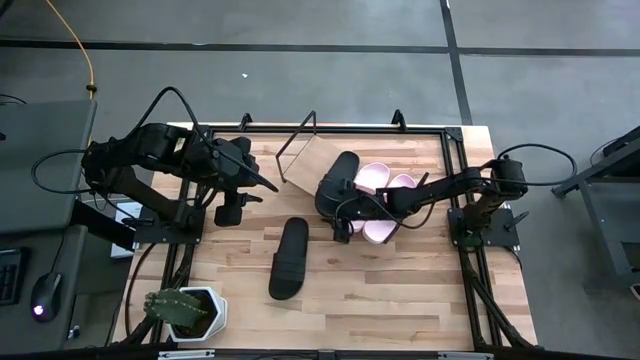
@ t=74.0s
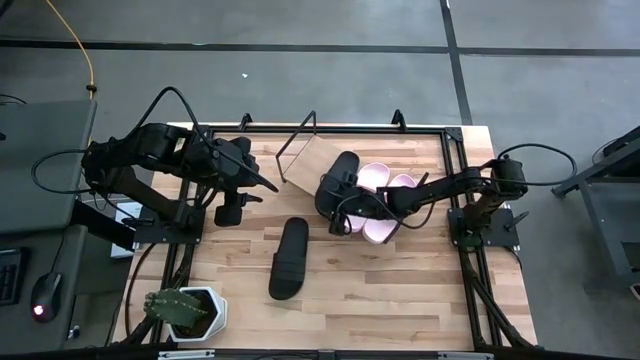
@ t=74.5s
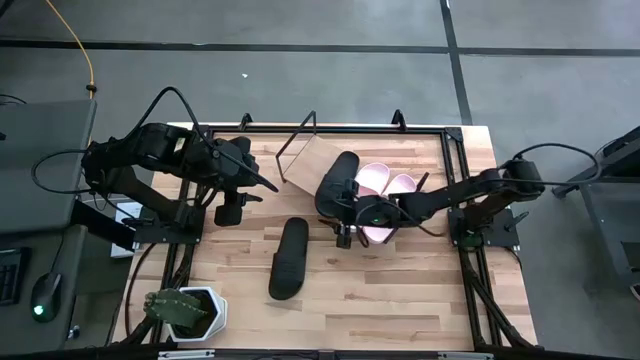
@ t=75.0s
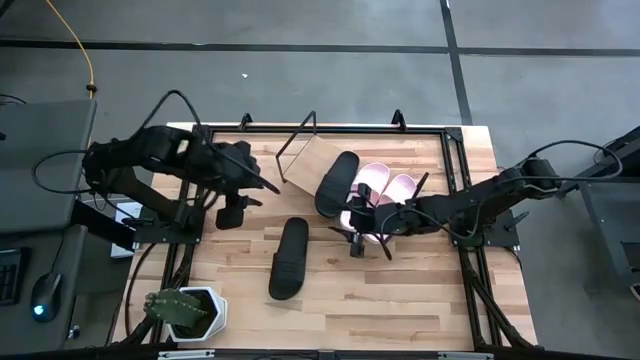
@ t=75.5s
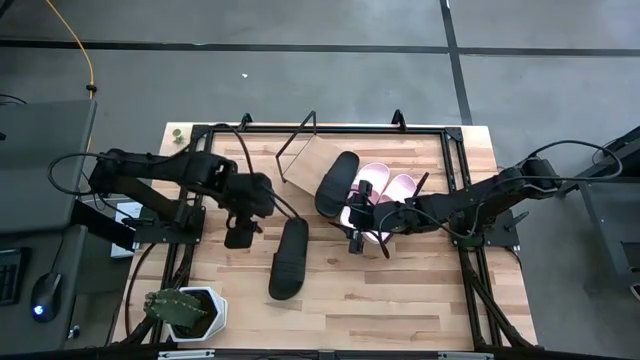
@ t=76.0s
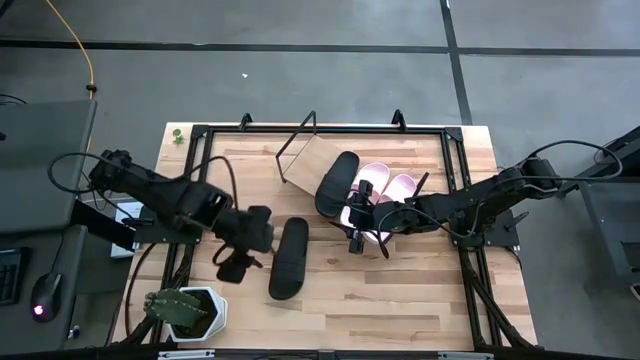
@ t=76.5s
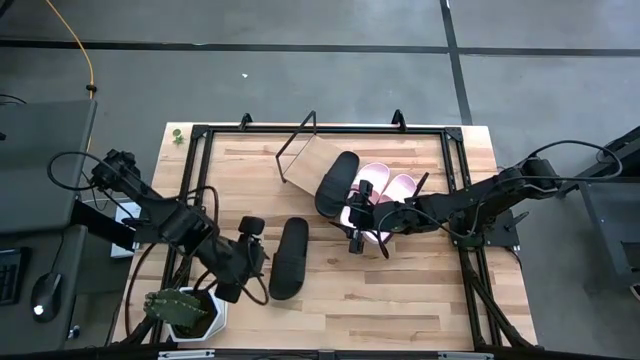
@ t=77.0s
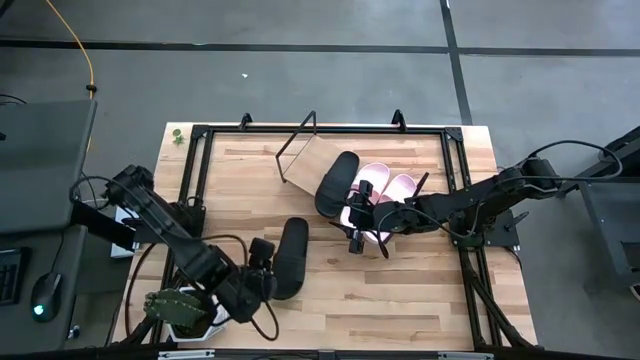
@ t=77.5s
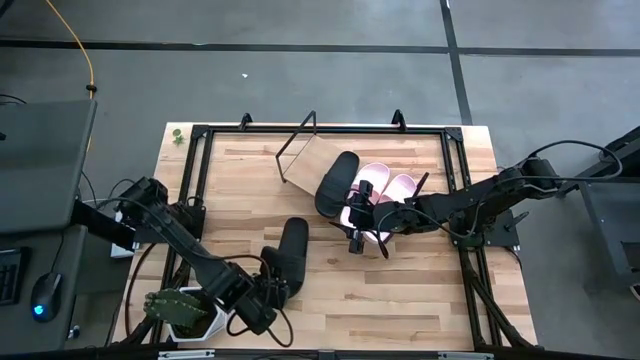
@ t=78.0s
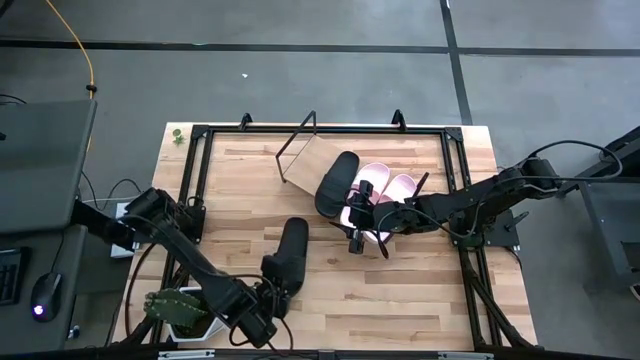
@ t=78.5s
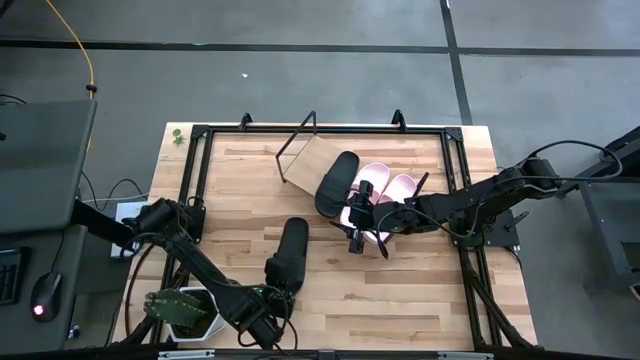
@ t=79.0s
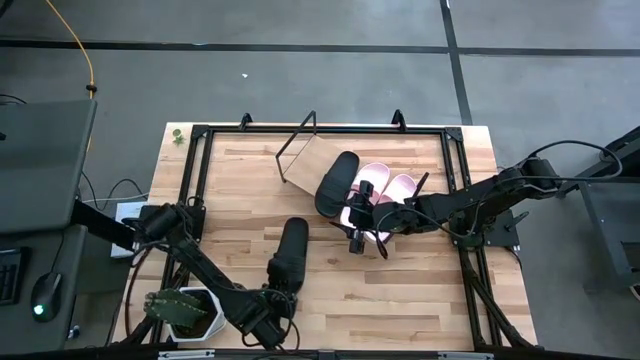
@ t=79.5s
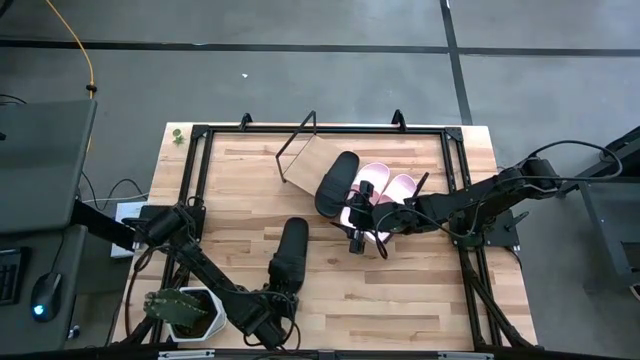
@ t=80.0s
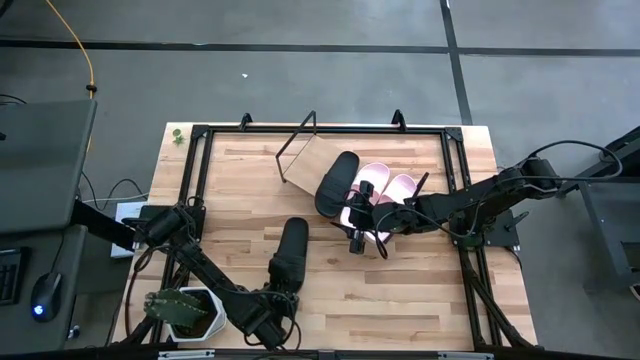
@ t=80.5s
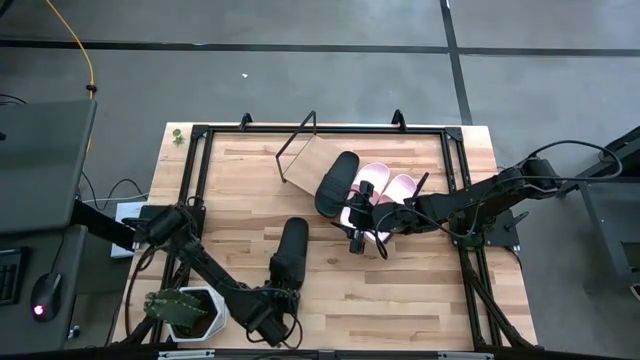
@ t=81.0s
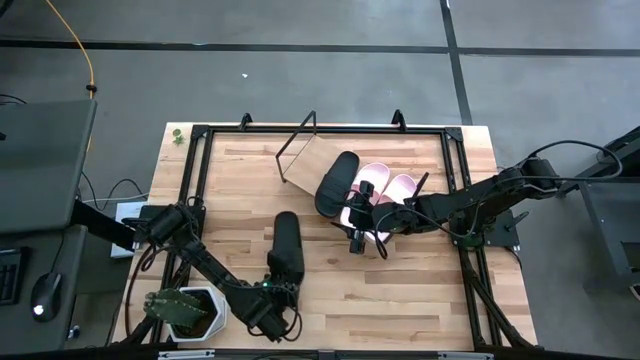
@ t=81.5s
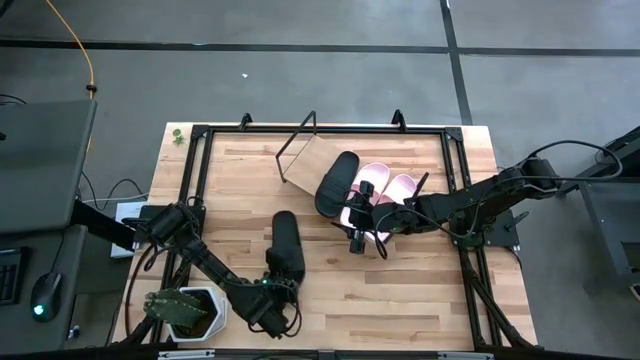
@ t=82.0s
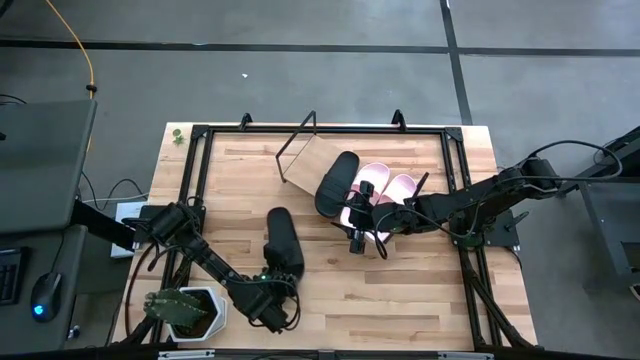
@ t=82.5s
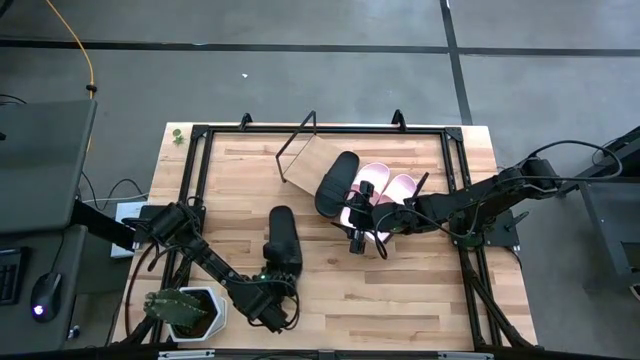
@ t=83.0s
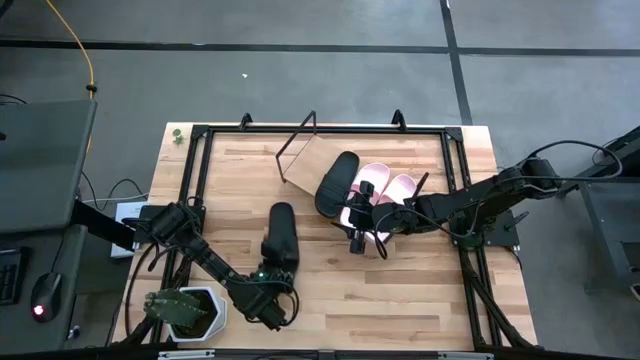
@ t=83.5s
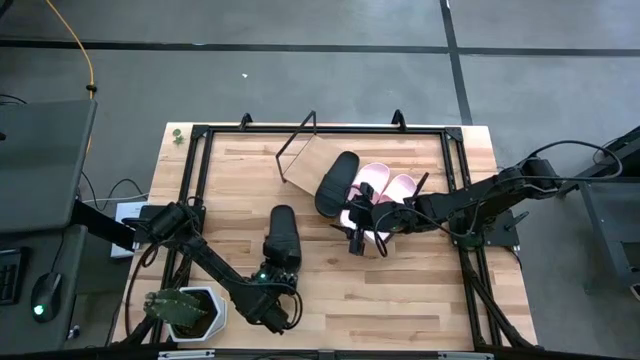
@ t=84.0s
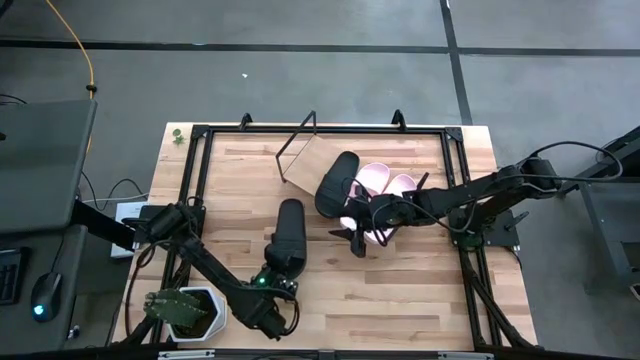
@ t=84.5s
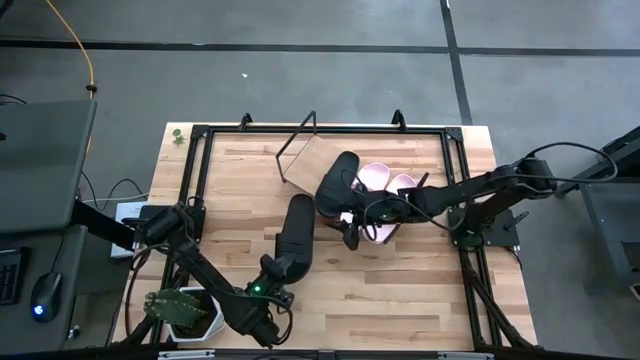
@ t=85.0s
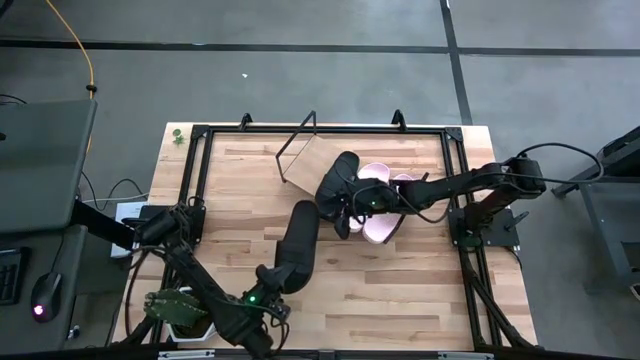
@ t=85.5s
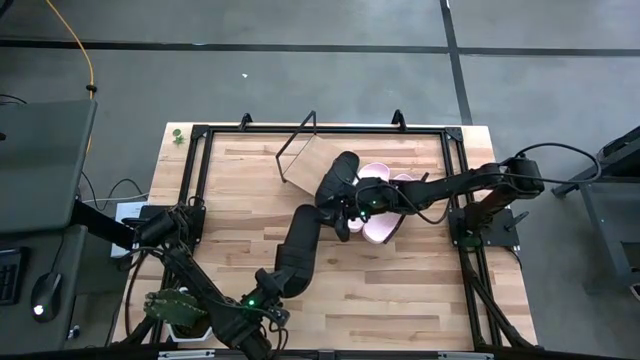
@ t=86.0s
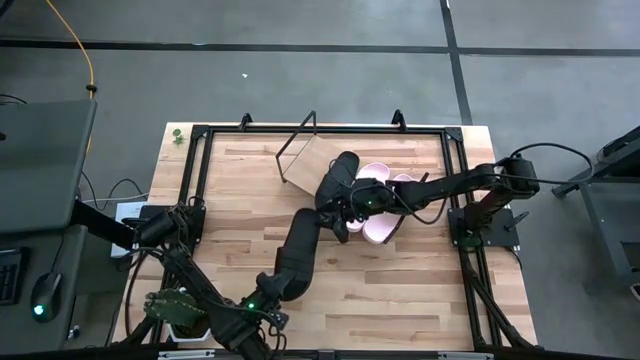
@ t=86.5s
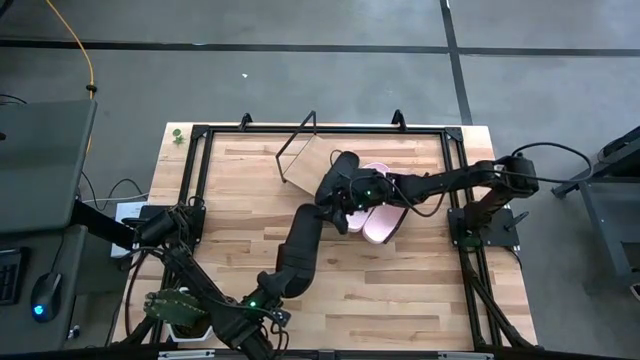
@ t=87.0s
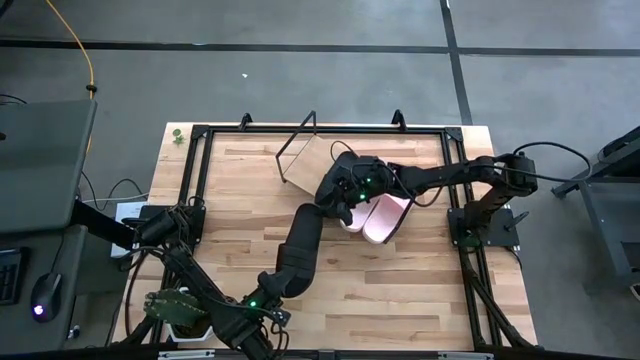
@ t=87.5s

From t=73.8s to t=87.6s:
Task: Pick and place slides into the shelf
Put the black slide to the shelf

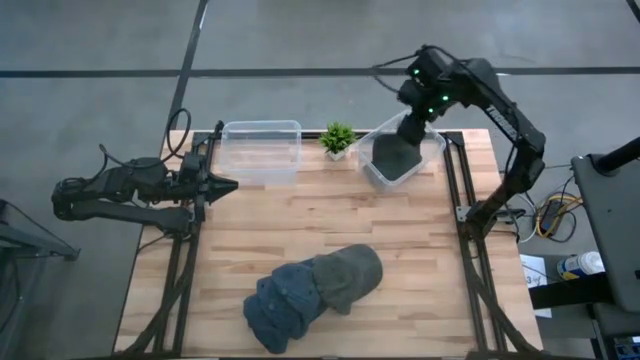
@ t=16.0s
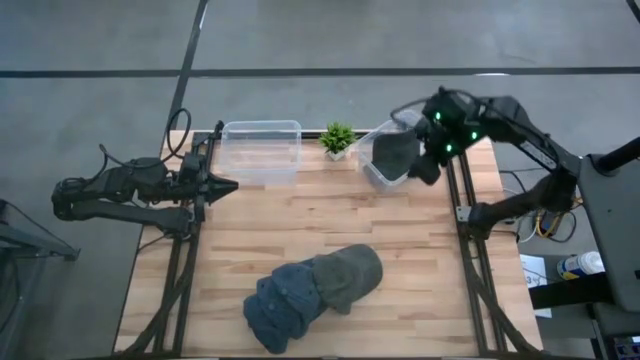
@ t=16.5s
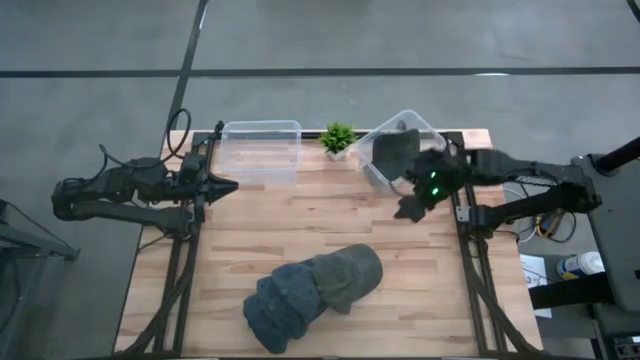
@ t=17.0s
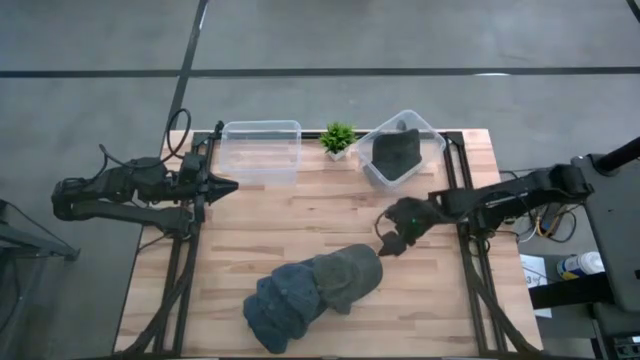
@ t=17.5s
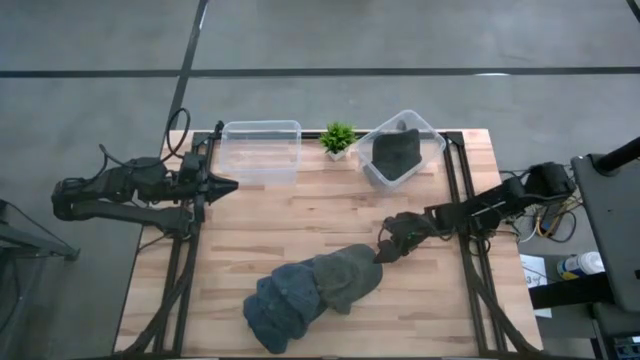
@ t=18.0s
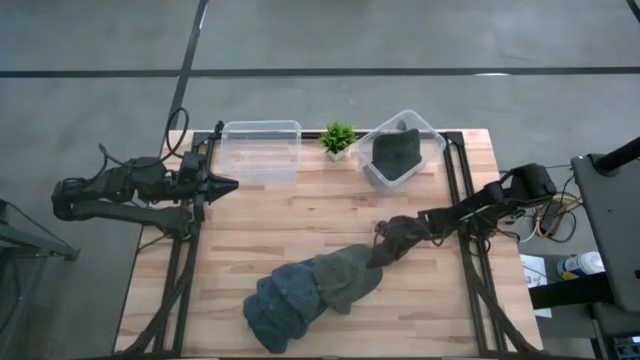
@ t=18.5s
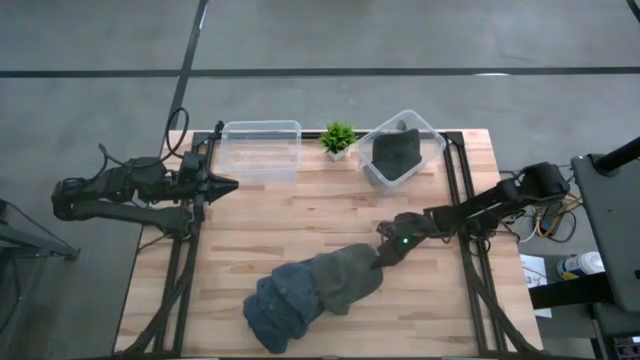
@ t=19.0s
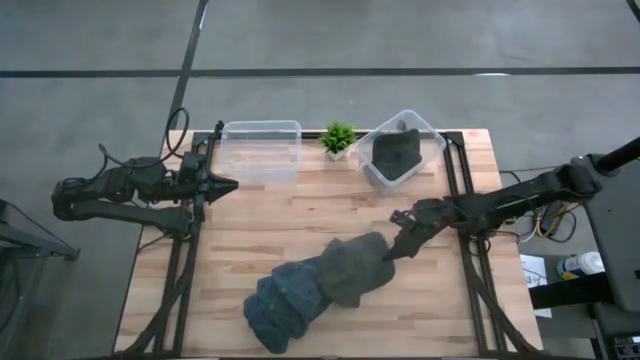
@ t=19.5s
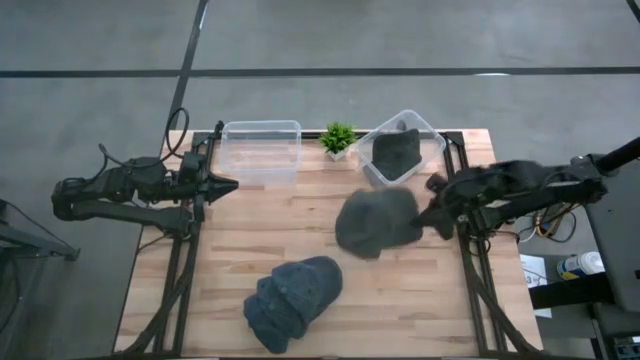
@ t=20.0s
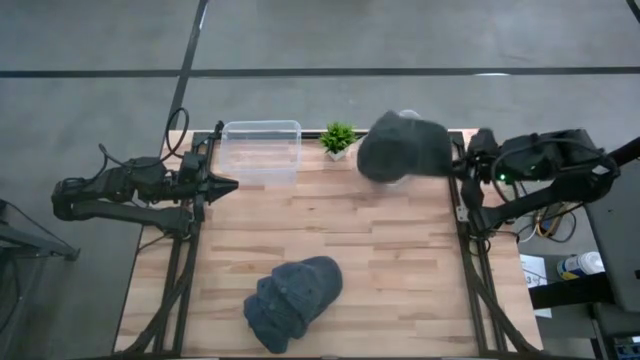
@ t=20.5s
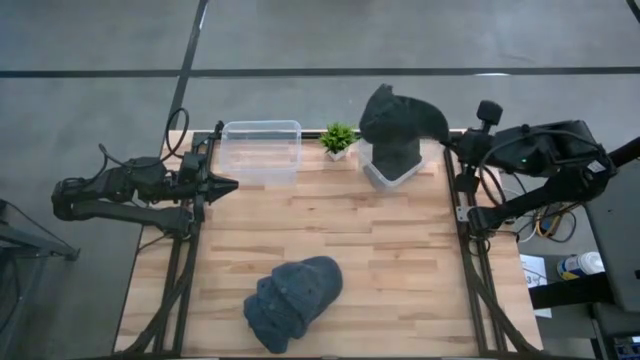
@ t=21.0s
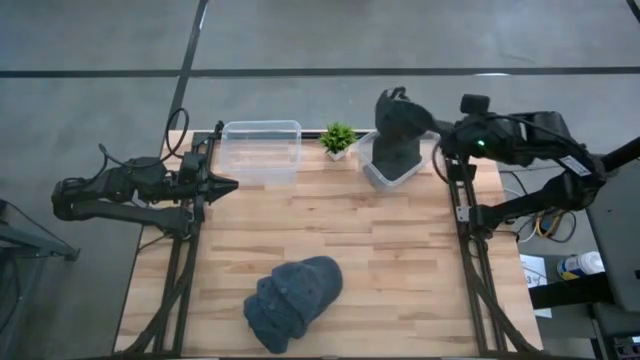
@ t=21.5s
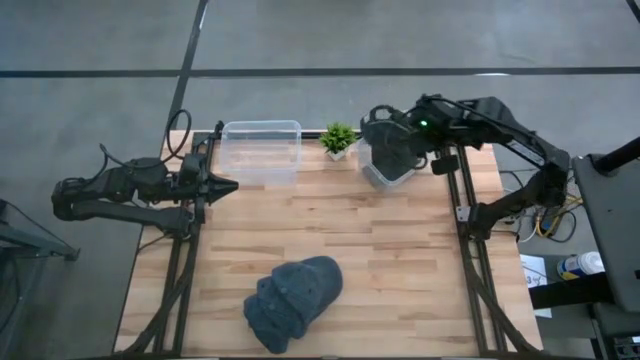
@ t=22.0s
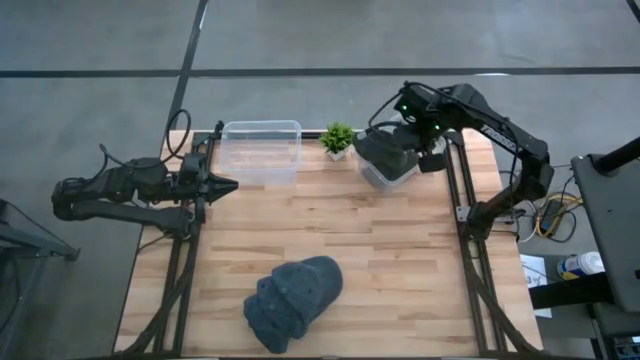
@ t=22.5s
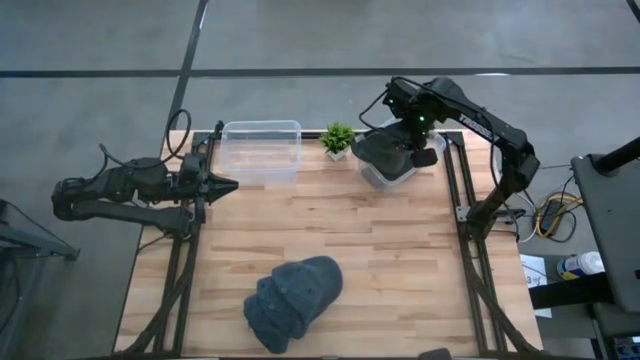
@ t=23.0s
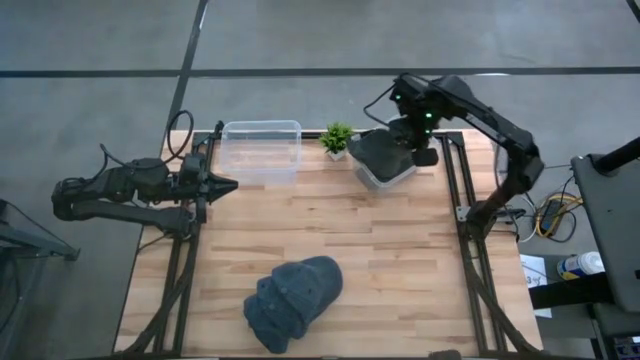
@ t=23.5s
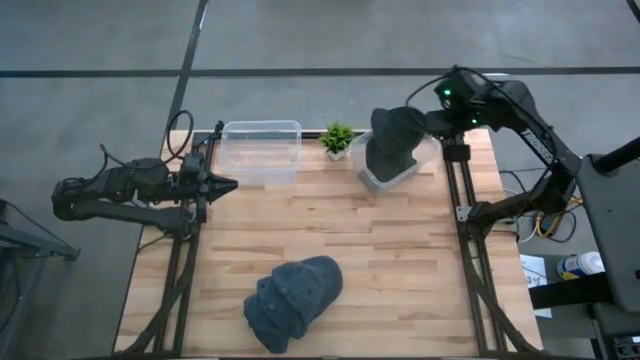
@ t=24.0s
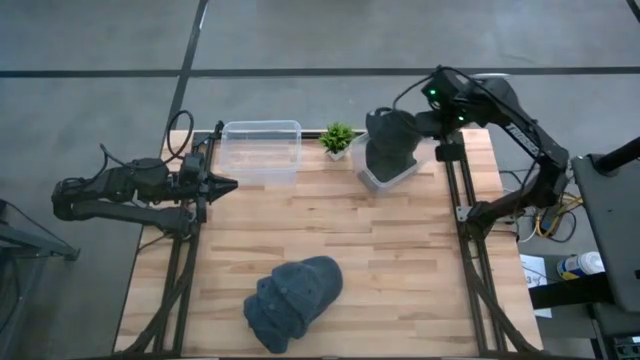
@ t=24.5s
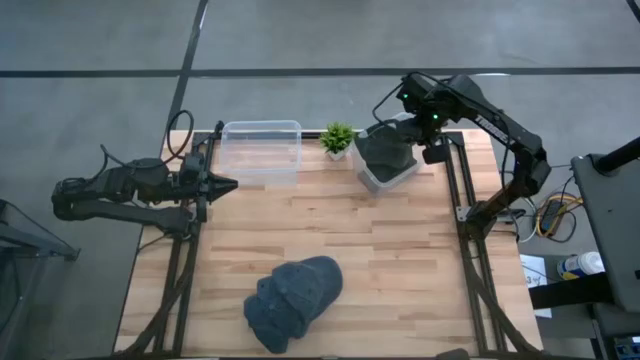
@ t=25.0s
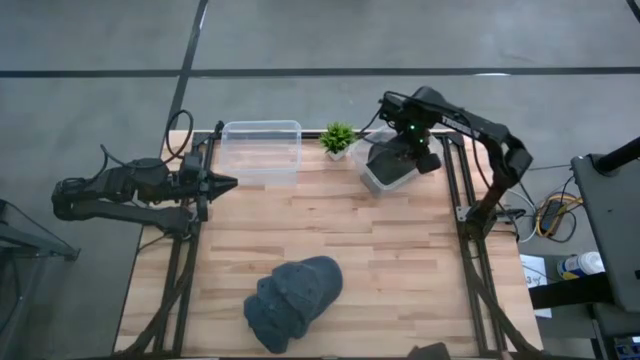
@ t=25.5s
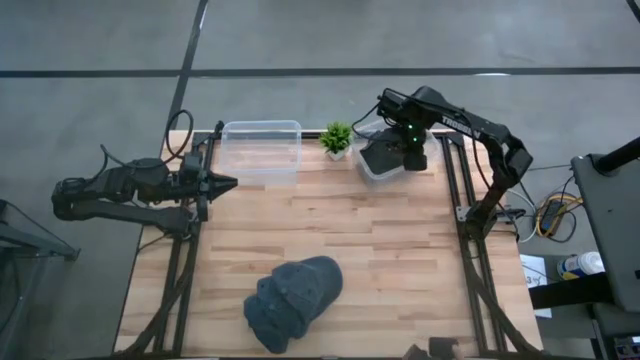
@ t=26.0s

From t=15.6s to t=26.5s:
Task: Pick & Place hat
Put the green cap into the right transparent bin
